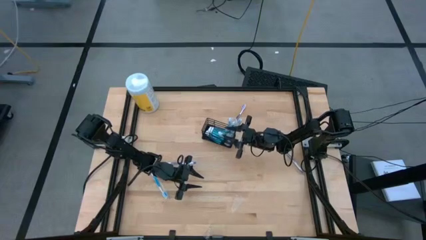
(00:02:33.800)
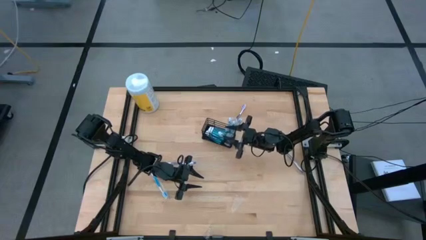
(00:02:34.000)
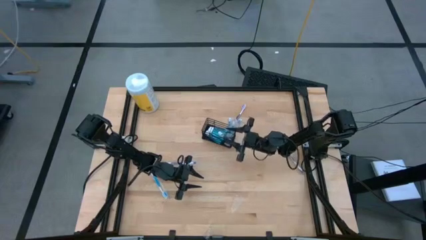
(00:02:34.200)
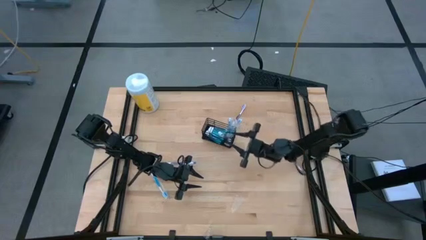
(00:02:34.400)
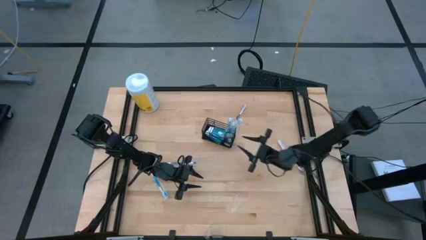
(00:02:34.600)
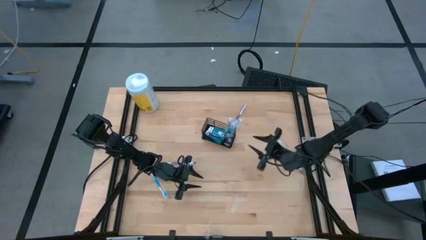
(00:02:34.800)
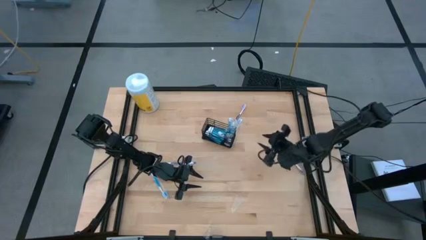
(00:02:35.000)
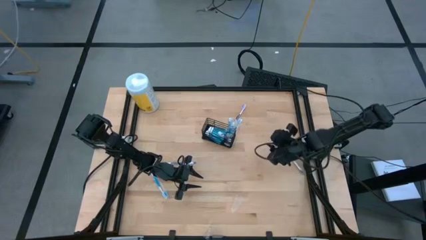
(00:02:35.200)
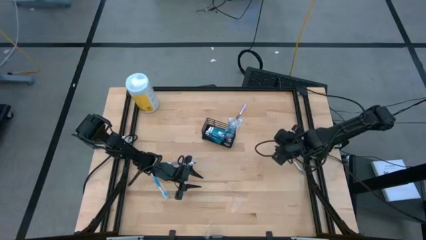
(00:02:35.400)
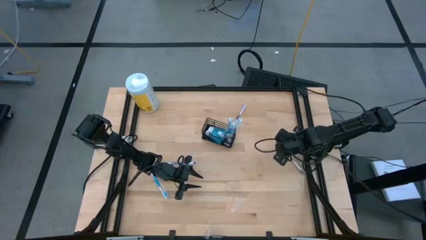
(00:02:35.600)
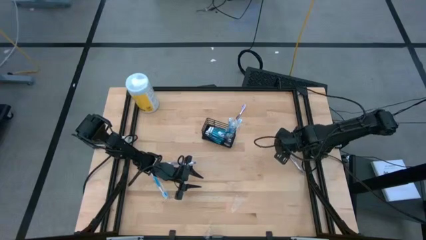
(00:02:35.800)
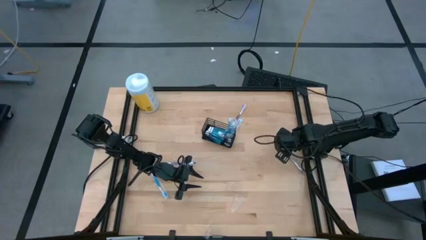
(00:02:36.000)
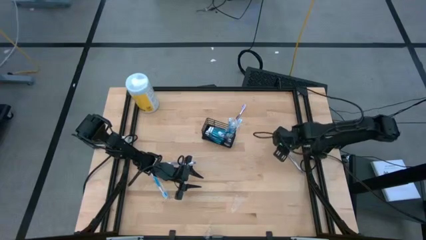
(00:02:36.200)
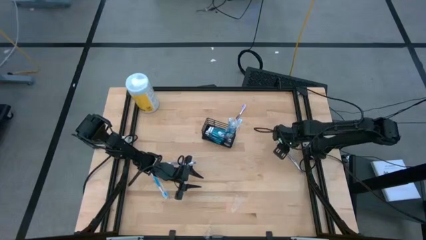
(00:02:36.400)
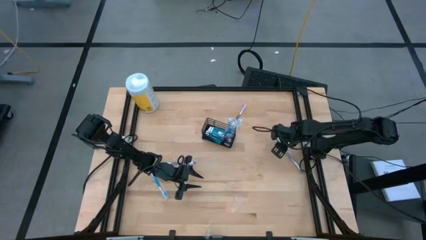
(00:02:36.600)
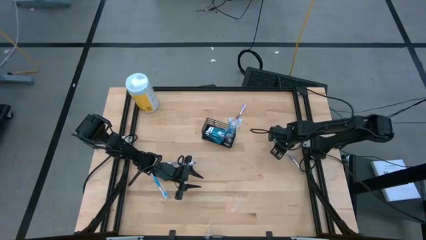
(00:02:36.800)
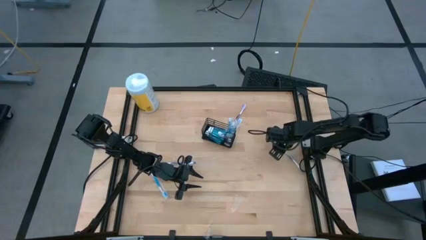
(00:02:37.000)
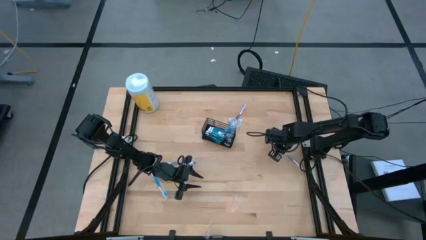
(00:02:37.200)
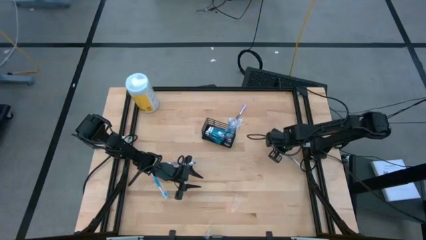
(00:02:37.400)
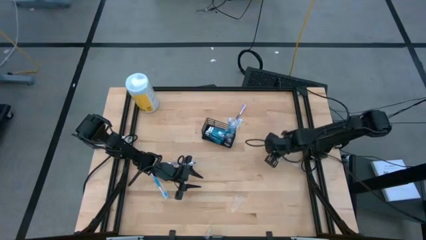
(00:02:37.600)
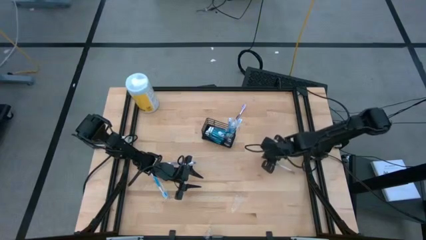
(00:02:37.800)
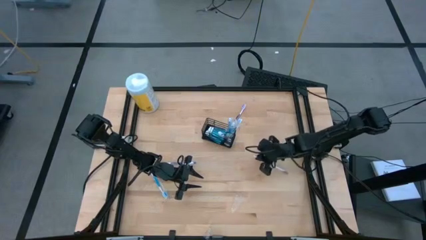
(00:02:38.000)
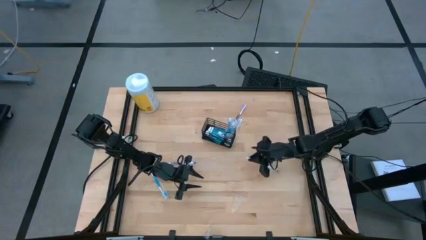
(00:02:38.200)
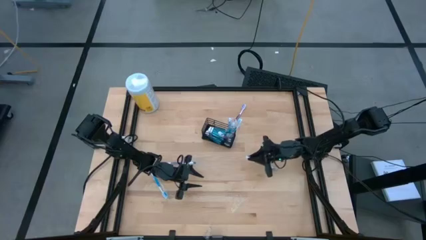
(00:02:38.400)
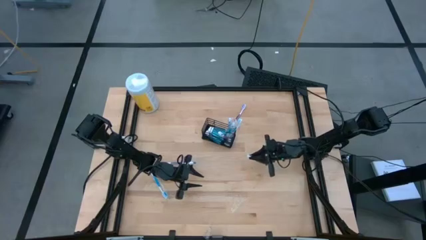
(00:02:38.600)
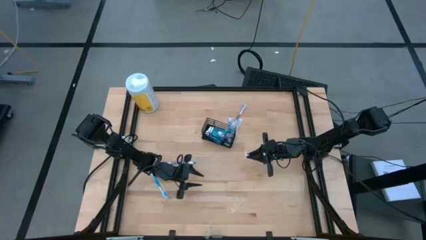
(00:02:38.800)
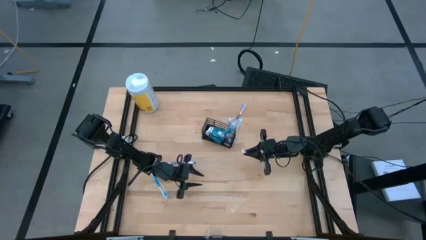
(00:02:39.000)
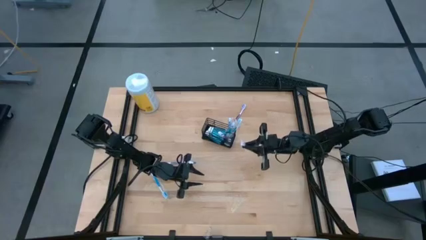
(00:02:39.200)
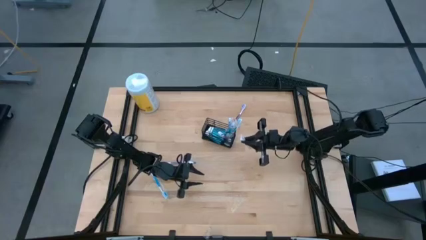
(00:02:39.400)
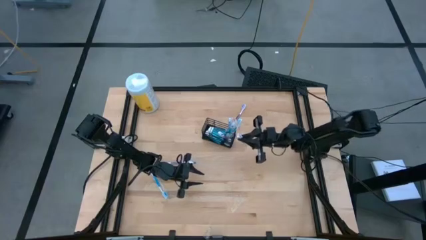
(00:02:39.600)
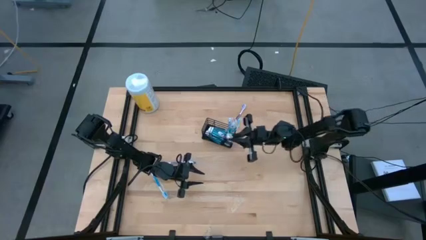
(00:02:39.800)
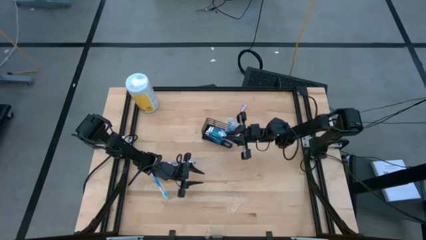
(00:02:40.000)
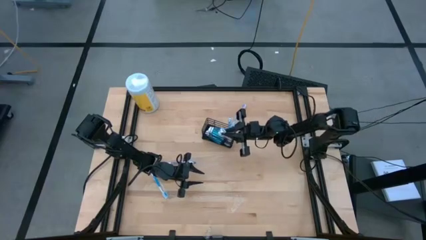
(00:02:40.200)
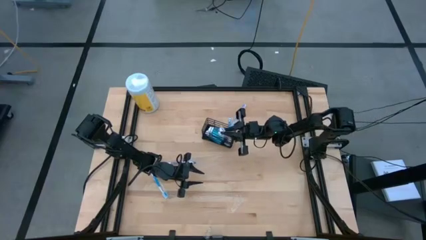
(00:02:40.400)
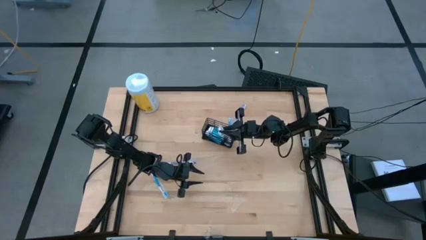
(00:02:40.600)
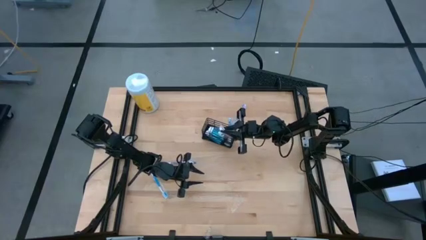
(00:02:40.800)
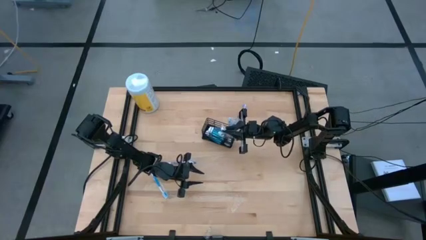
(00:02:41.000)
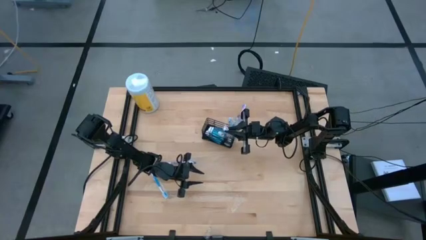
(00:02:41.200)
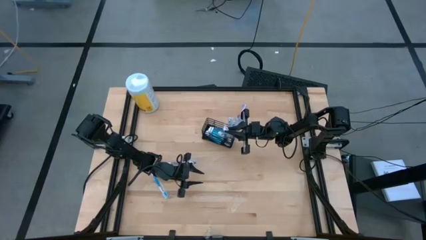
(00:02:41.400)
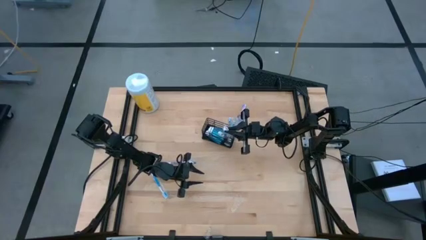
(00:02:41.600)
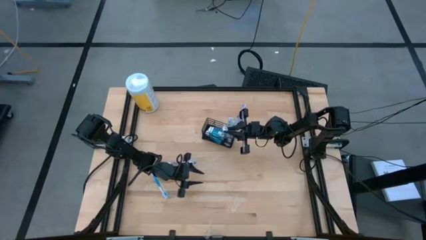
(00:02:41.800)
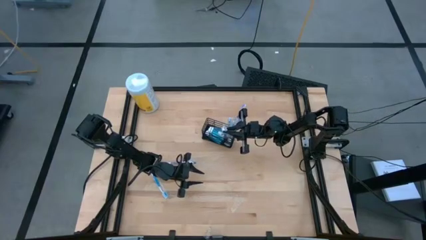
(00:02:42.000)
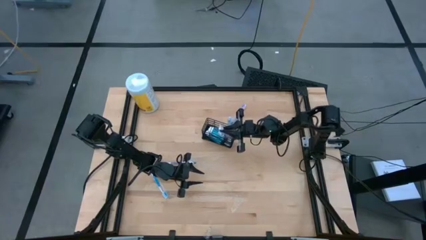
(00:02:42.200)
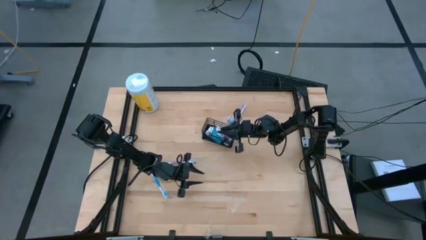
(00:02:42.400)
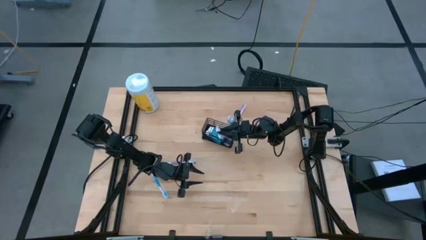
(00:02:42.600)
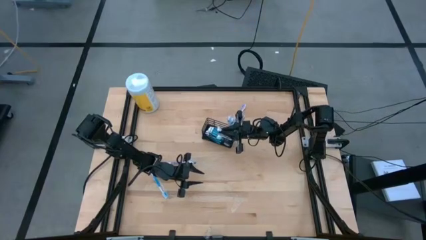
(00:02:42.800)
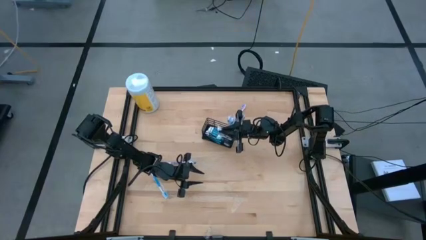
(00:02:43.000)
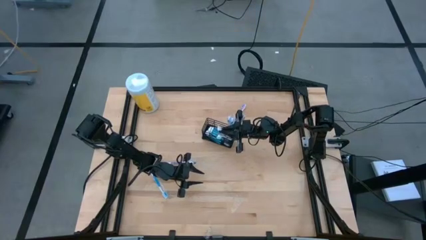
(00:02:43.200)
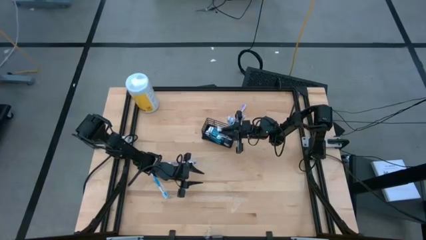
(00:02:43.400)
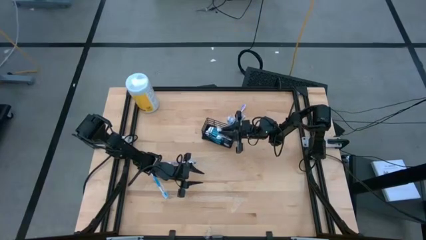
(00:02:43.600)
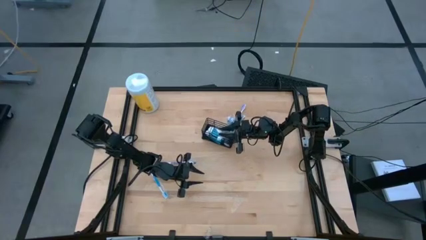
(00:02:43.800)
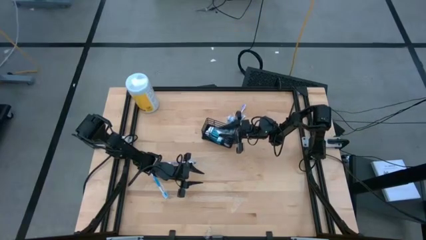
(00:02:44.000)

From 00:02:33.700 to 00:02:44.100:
Task: Pick & Place toothbrushing station
Put the purple toothbrush into the wire organizer

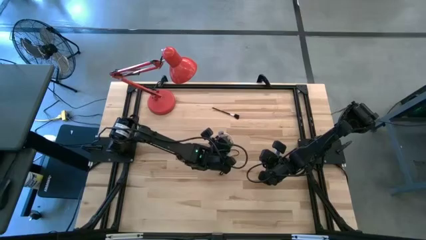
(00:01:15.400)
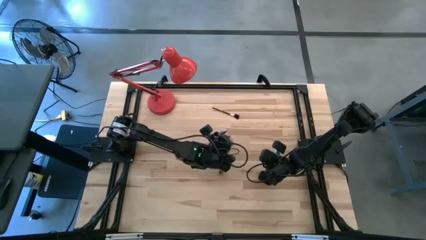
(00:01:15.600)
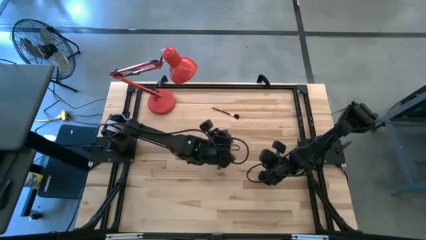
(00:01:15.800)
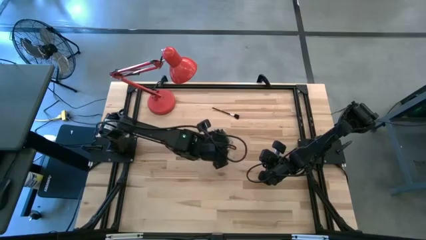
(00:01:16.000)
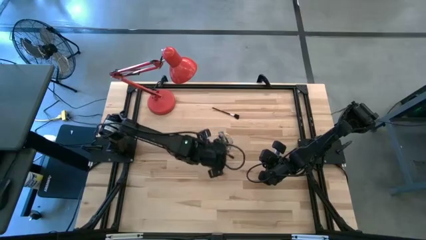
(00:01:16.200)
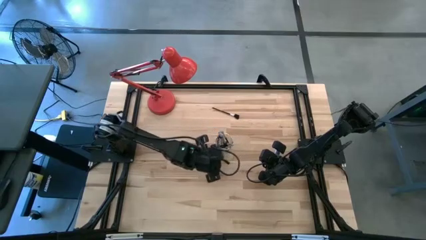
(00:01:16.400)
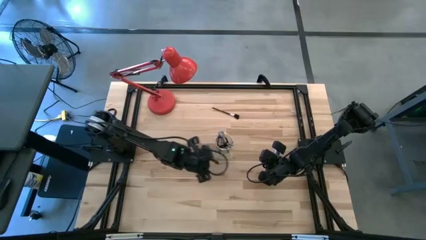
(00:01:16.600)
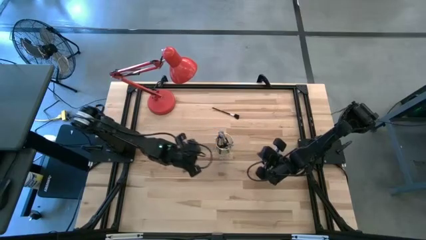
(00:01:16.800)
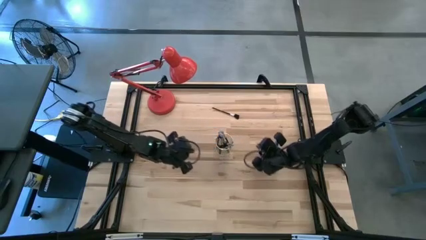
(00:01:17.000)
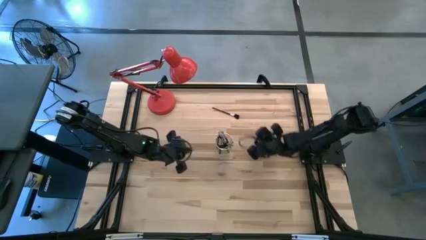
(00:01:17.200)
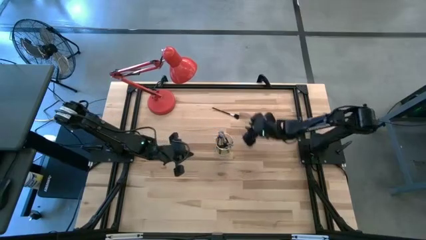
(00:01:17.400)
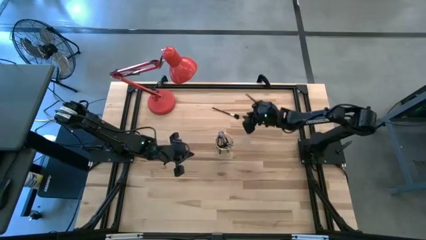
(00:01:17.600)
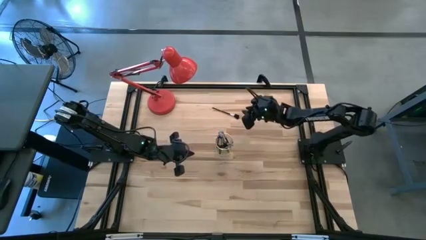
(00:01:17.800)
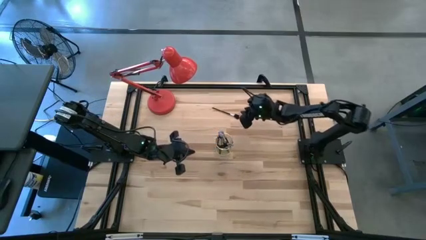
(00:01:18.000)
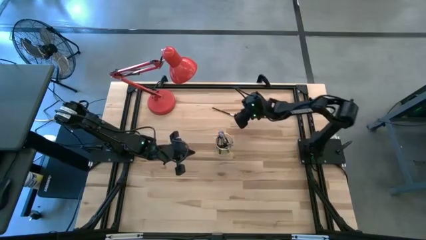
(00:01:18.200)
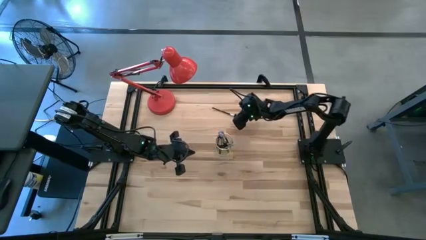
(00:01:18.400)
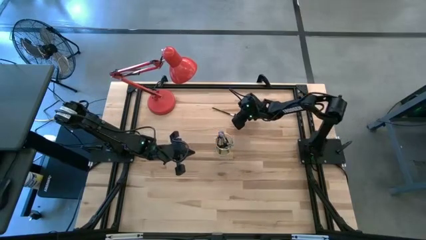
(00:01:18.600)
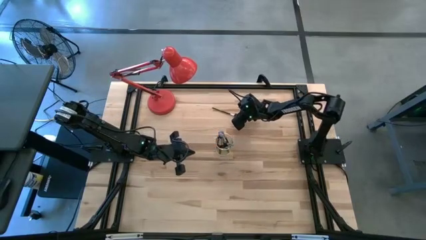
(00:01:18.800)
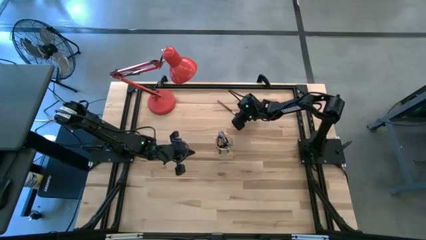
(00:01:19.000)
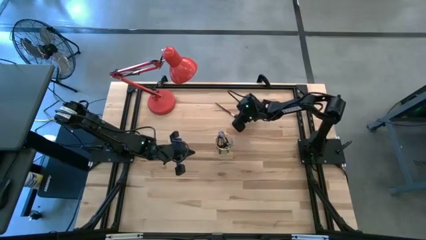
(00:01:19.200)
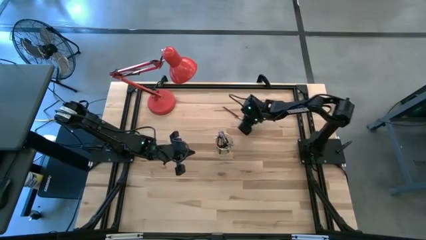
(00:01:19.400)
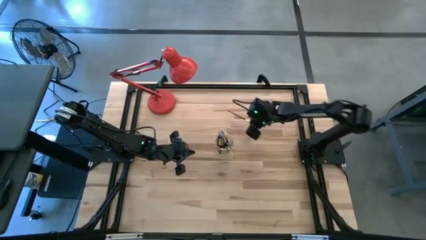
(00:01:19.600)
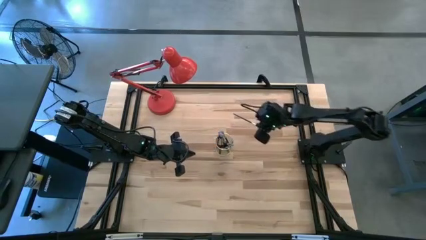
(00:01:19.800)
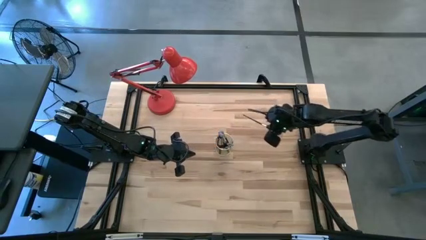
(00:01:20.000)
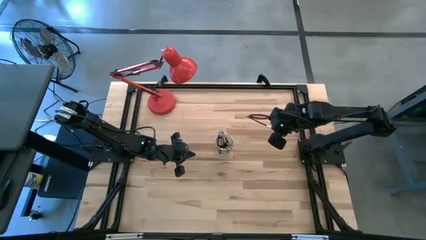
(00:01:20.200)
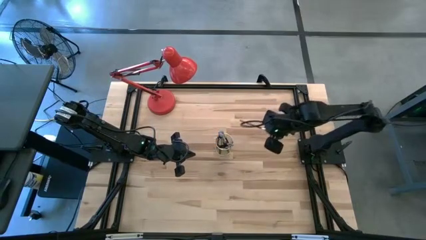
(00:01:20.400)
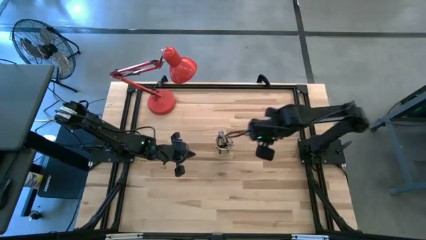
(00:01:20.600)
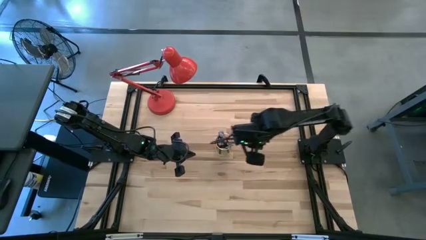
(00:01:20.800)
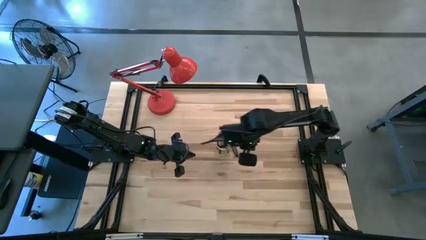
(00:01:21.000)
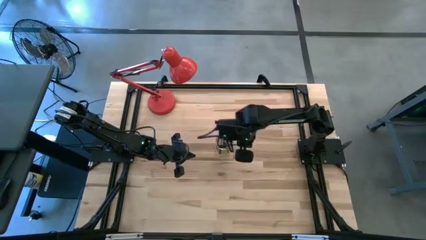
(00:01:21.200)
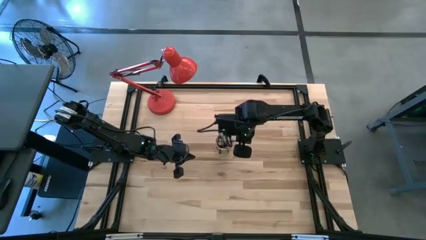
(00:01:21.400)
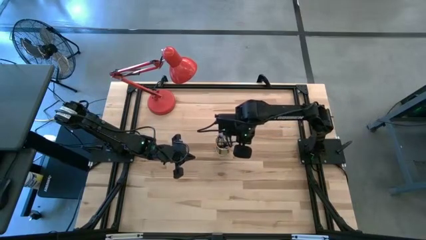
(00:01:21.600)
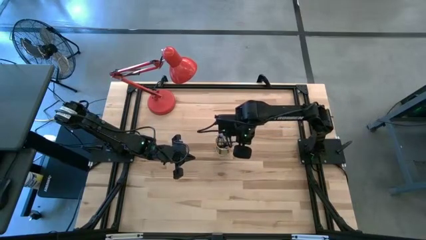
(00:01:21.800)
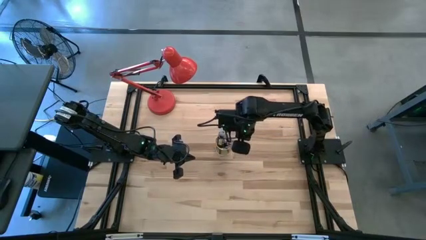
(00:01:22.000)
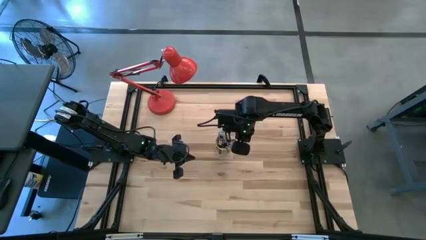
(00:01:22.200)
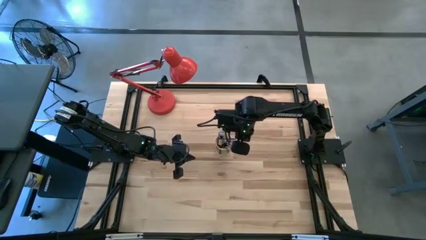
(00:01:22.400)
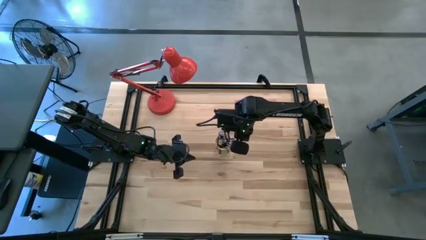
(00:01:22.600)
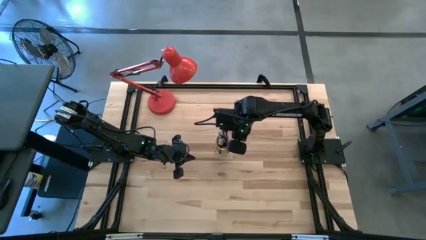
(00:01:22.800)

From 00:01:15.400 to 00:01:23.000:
Task: Put items in baskets/containers
Put the brow brush into the wire organizer
